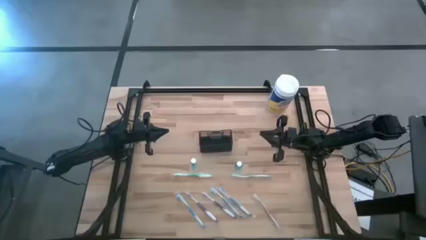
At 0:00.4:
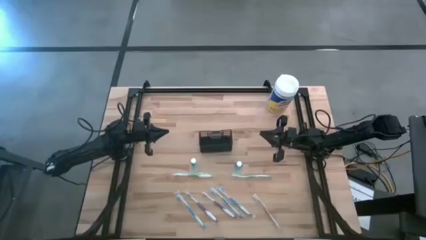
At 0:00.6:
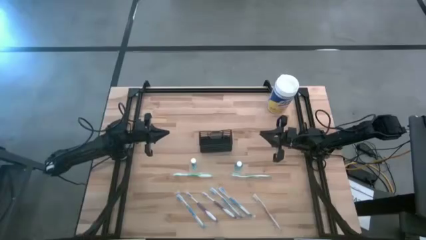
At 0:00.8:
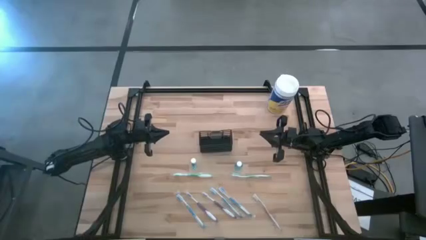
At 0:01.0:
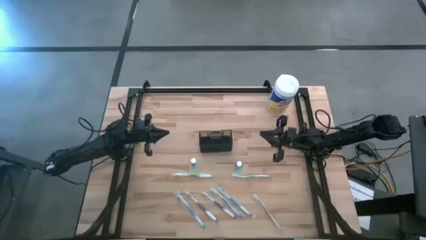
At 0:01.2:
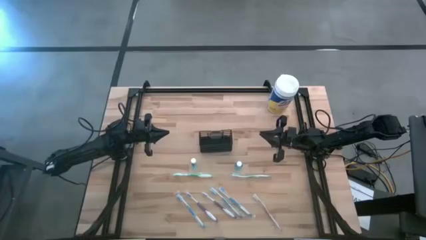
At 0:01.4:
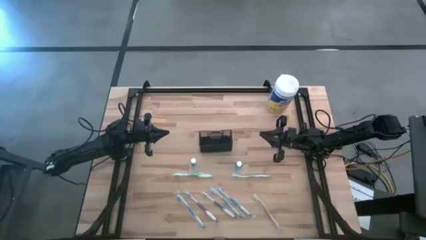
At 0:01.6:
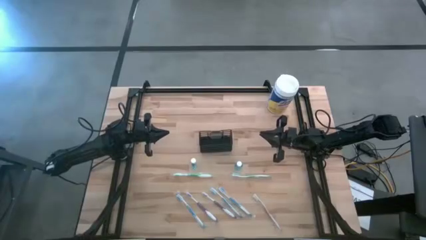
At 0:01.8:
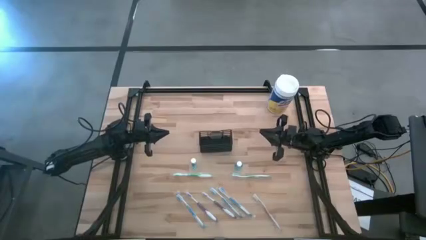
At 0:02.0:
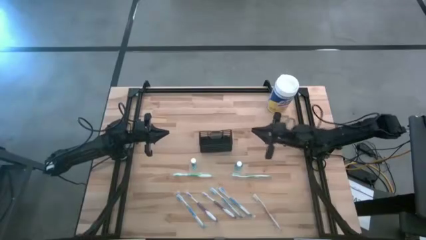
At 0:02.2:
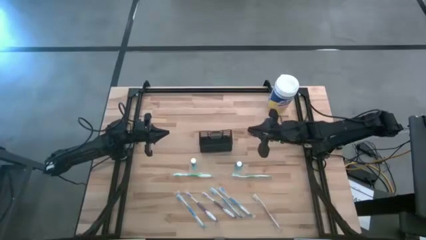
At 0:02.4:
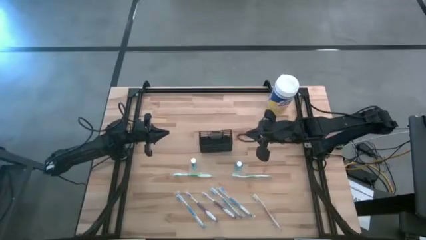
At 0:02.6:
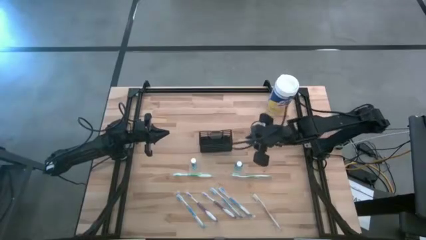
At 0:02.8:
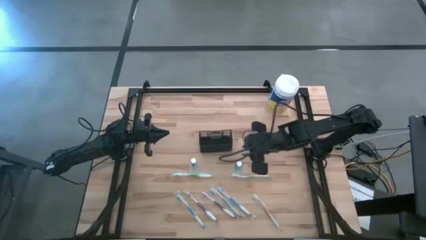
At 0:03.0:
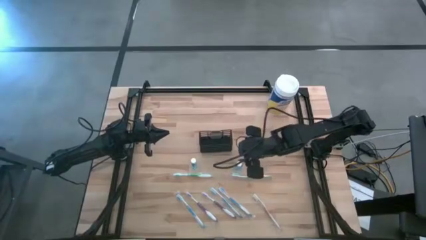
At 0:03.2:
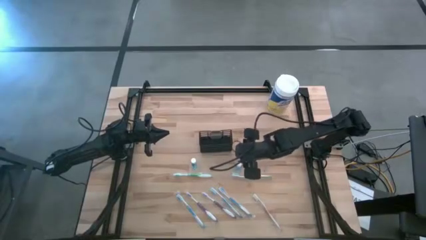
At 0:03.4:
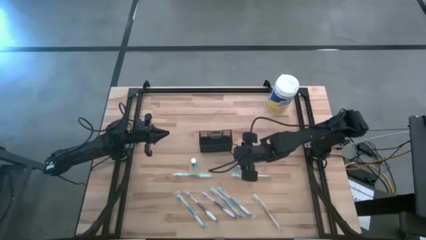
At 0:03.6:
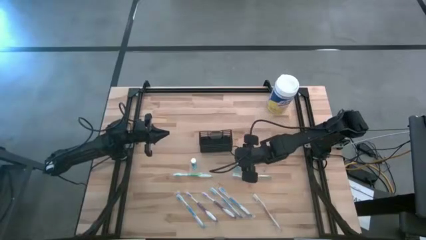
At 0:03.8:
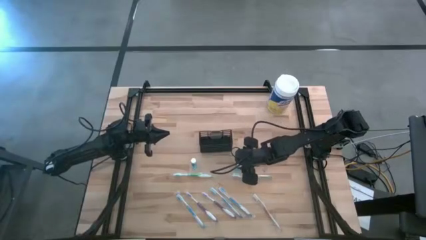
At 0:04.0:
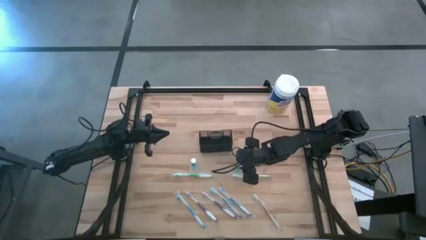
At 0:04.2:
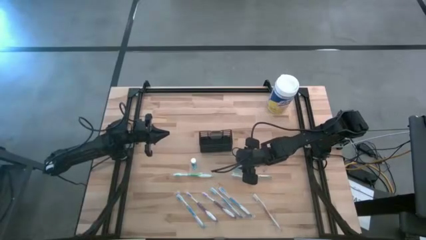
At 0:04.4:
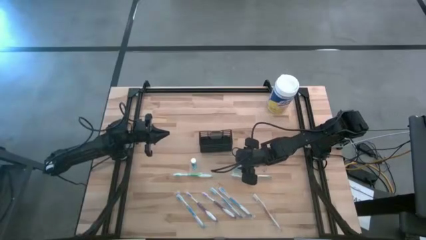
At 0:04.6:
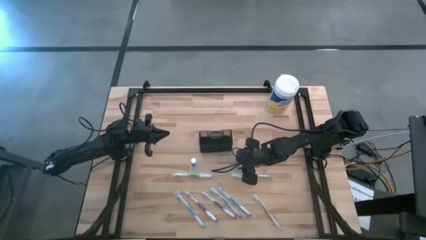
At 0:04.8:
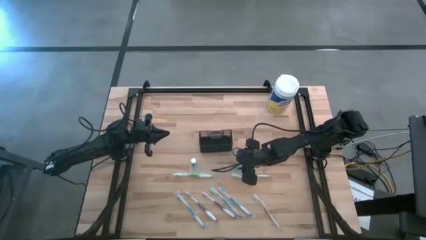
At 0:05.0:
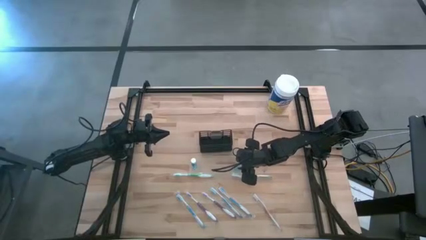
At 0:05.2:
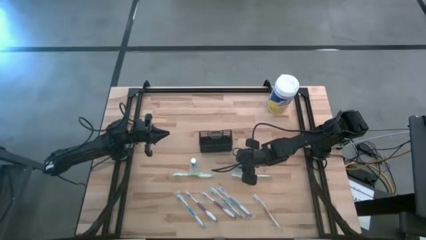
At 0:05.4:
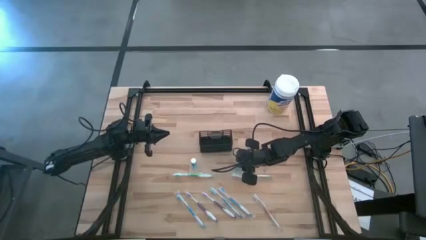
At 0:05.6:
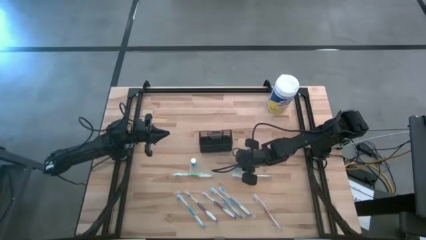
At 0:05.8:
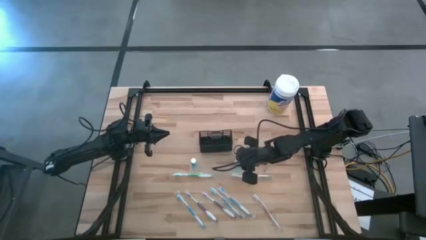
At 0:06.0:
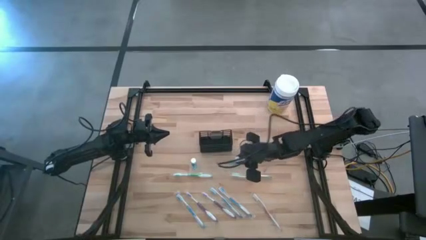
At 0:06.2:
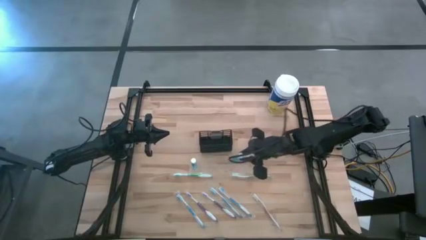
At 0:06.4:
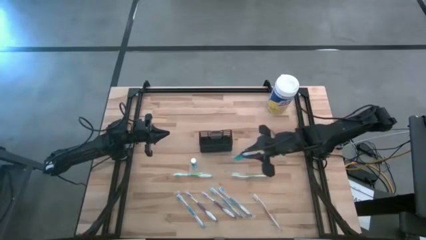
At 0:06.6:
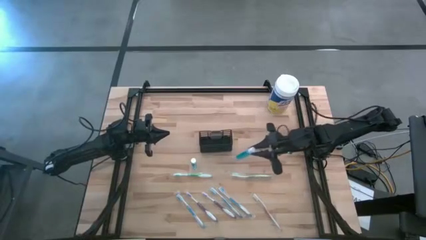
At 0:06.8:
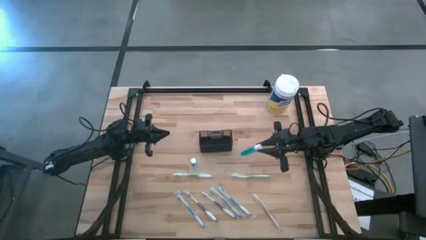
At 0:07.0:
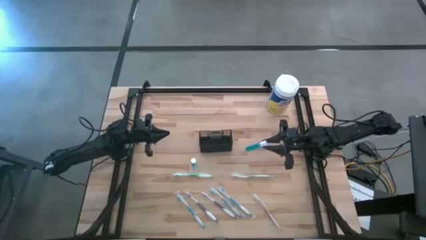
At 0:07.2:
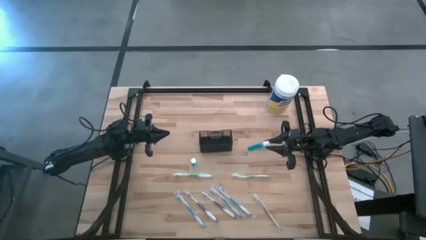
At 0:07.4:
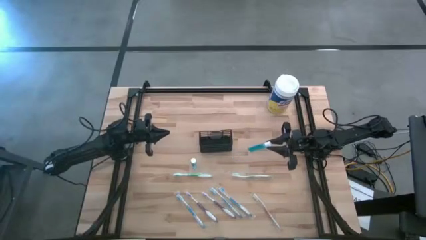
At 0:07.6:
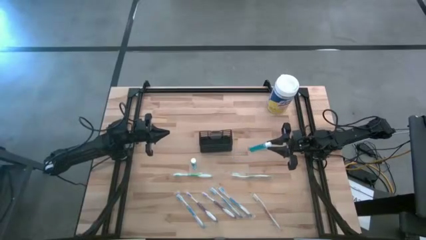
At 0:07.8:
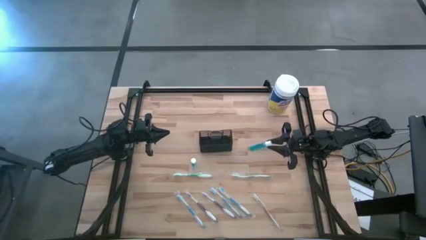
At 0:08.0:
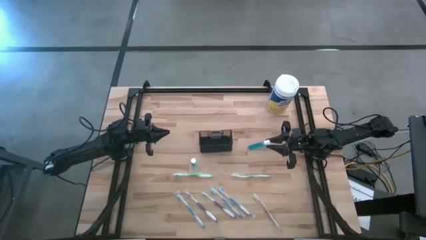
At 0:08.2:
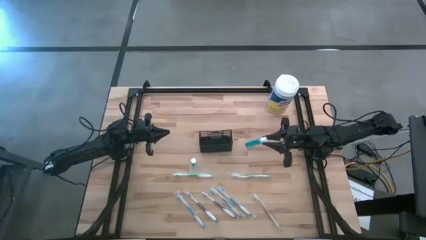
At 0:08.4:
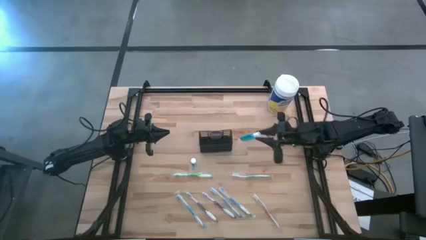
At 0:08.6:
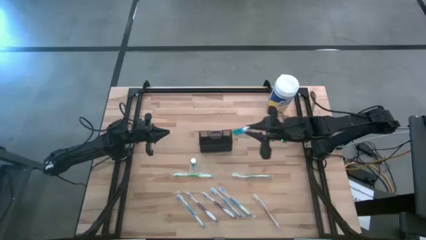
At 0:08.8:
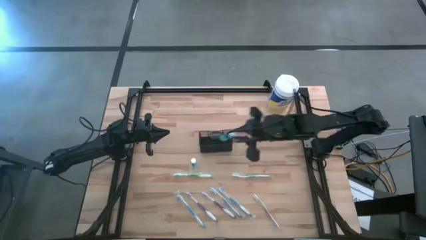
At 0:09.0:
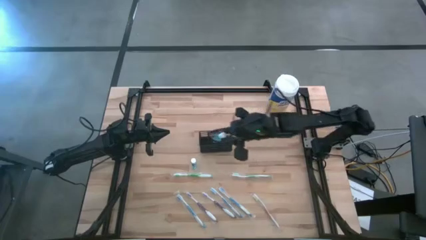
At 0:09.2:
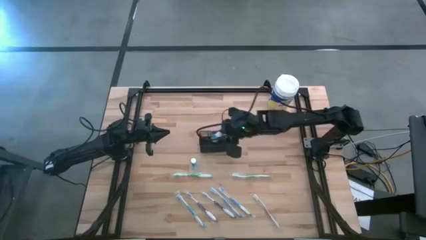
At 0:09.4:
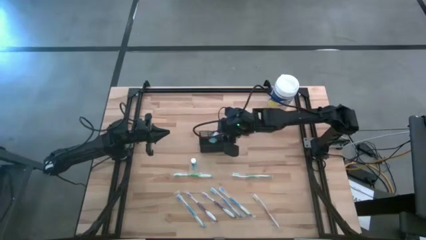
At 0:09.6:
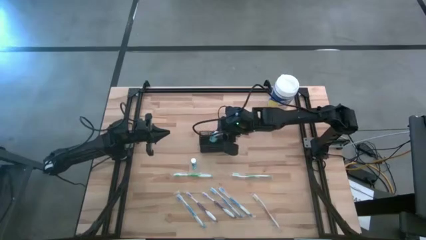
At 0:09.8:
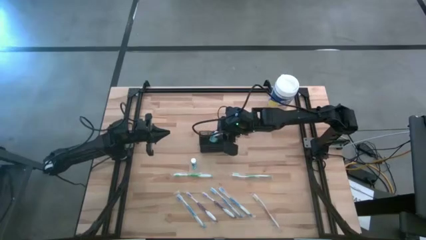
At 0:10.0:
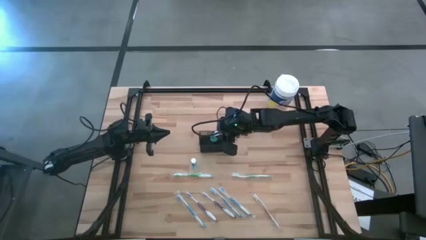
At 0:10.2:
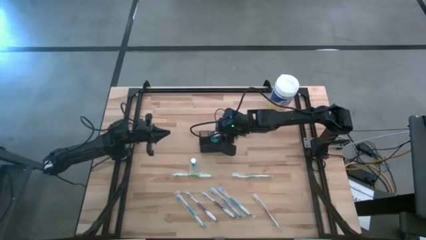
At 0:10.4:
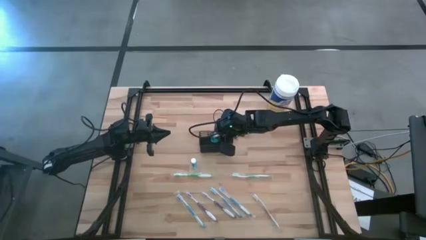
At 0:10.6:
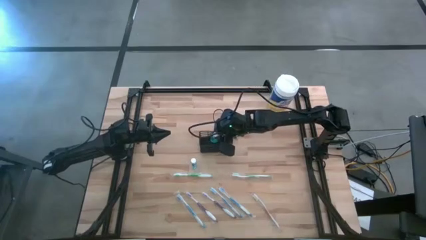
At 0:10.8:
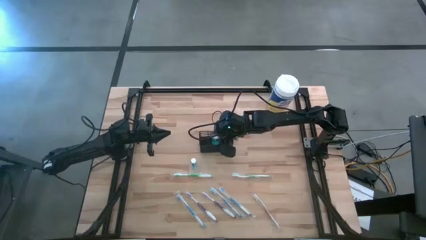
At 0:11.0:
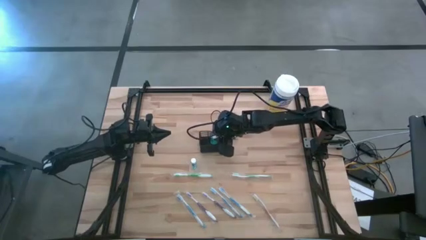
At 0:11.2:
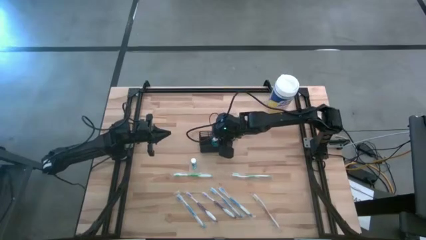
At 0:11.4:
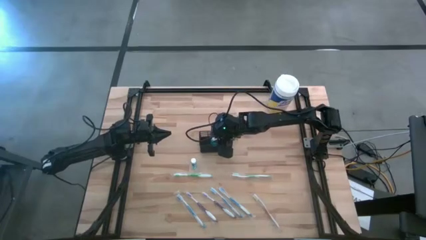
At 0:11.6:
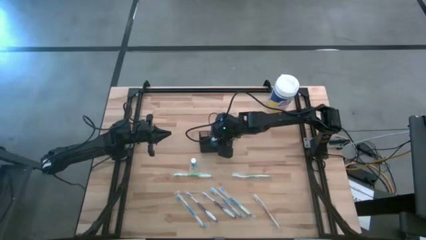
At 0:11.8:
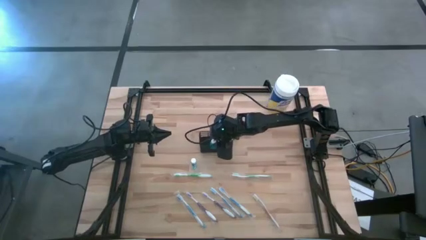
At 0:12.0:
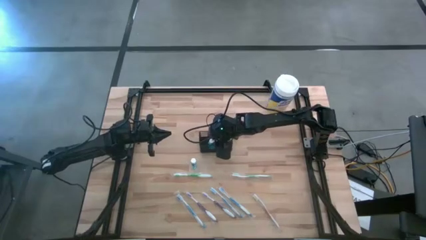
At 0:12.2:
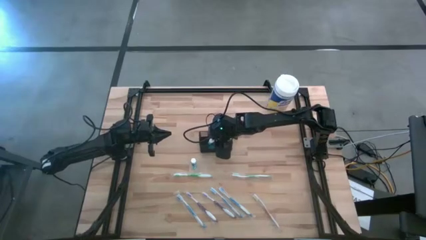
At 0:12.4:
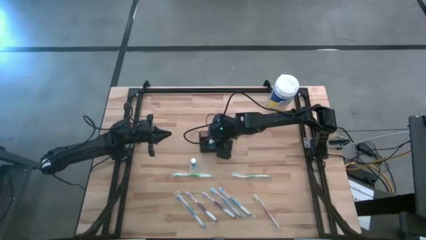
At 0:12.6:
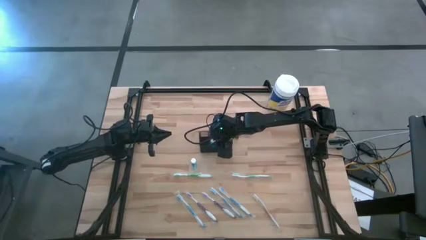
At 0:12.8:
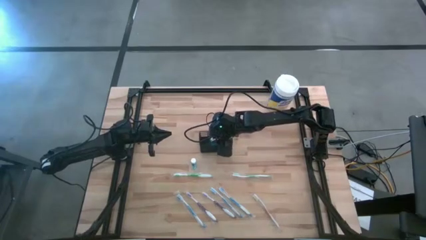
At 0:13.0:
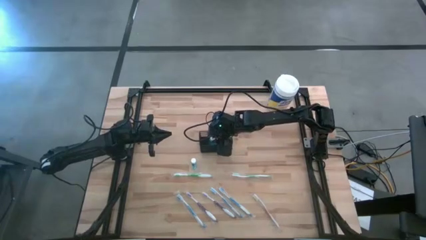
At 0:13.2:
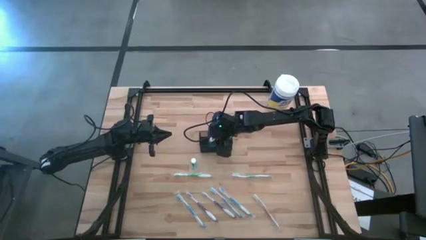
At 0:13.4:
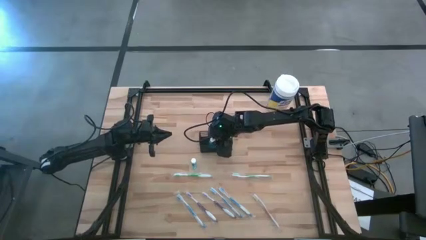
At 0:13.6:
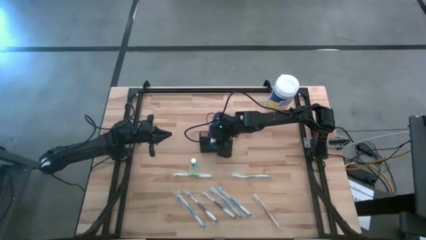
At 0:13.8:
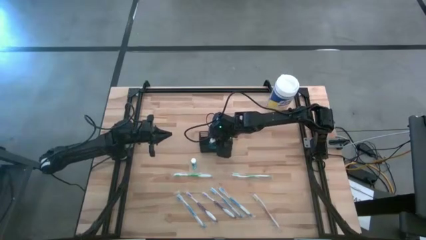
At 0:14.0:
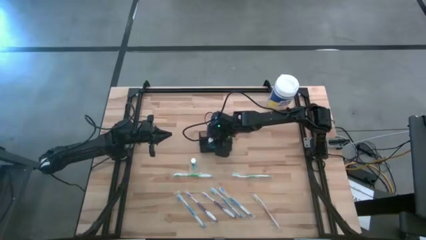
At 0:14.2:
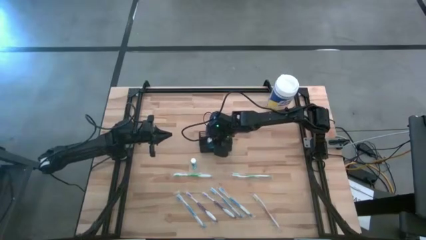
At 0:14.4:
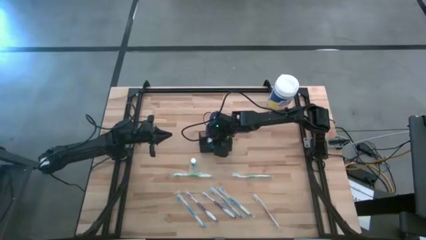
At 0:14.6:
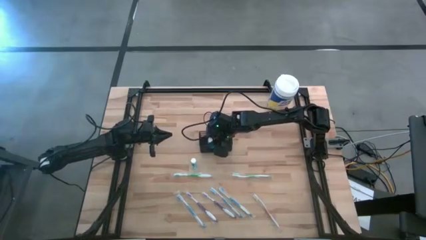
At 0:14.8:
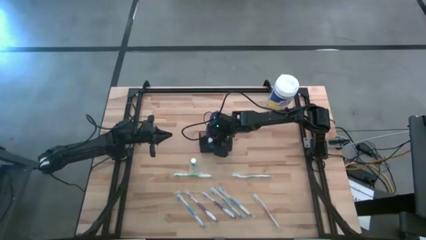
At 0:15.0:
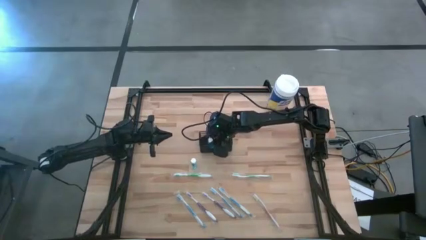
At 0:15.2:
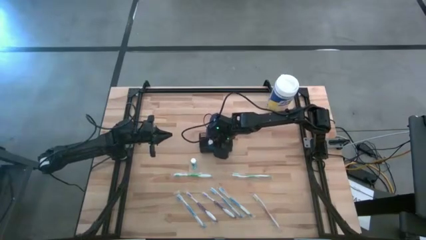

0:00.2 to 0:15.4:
Task: Pick & Place toothbrushing station
Put the right mouthwash into the wire organizer
